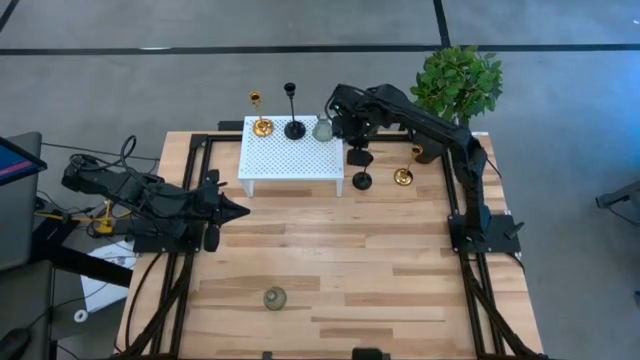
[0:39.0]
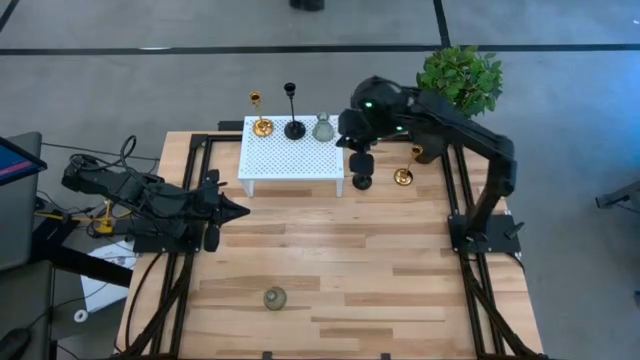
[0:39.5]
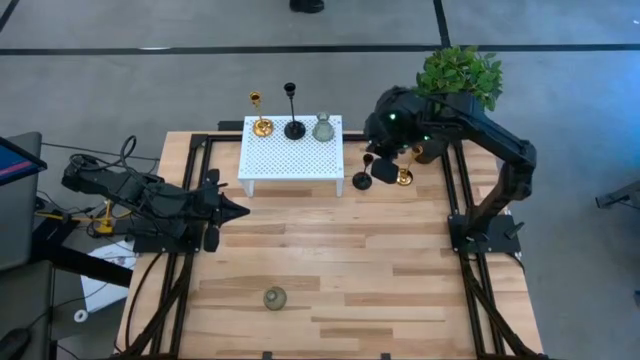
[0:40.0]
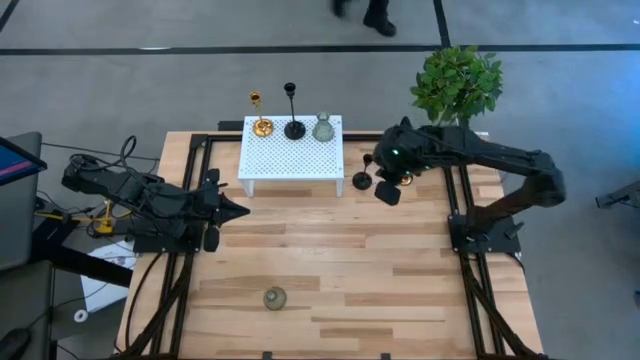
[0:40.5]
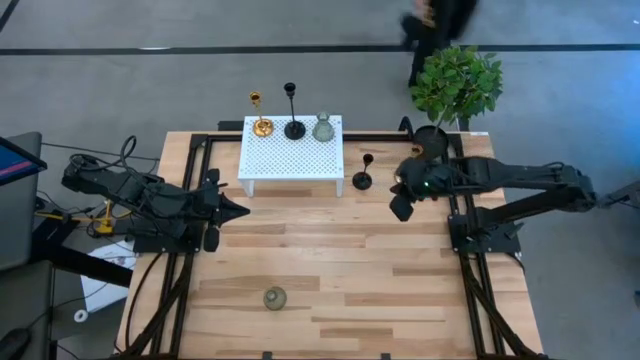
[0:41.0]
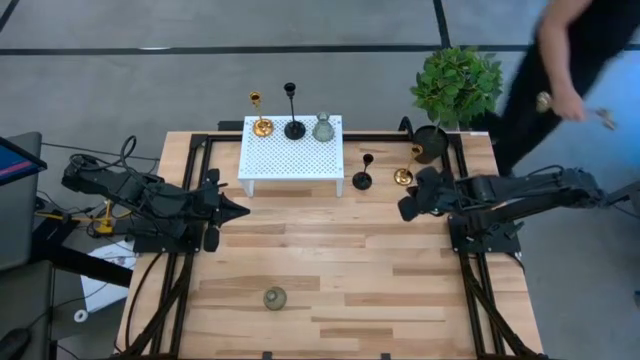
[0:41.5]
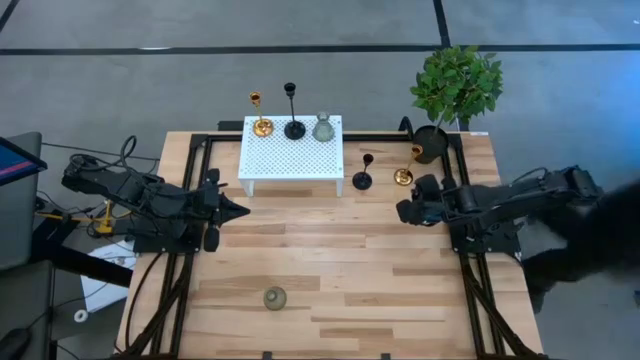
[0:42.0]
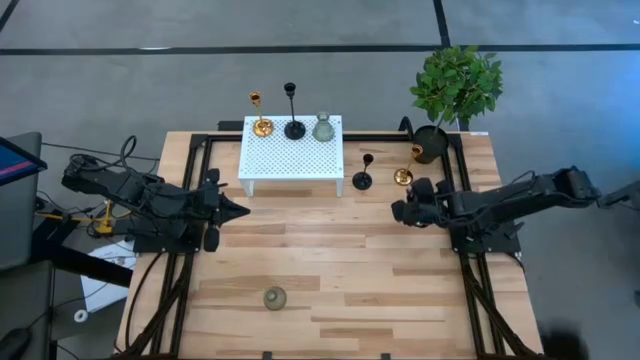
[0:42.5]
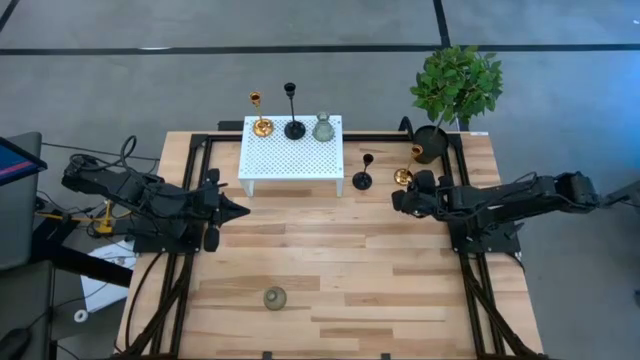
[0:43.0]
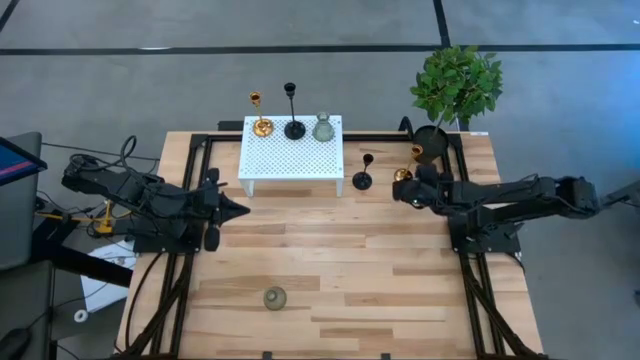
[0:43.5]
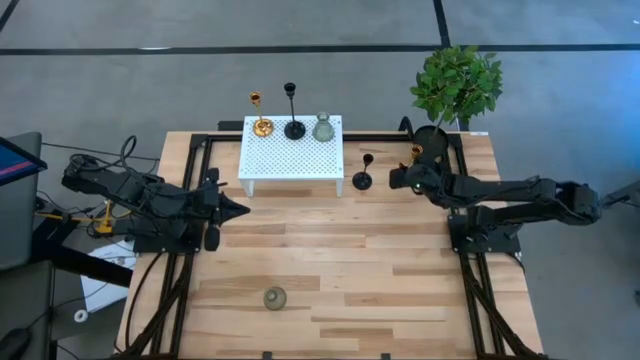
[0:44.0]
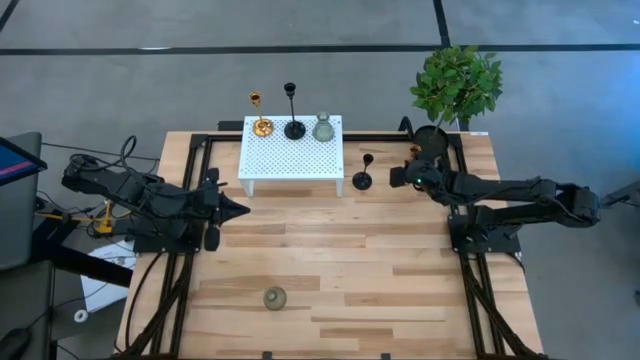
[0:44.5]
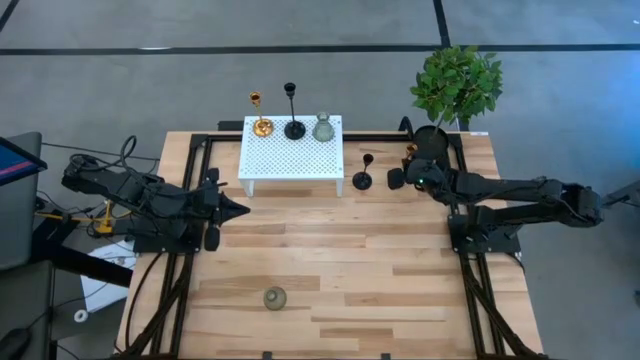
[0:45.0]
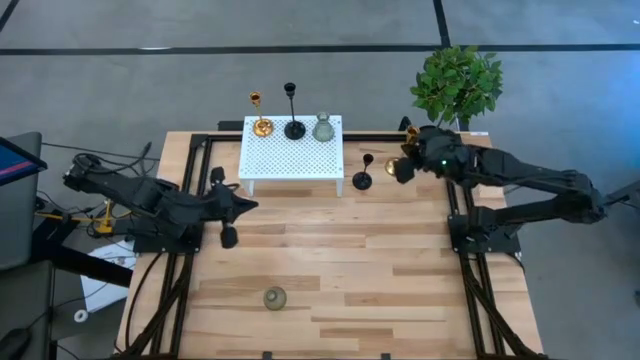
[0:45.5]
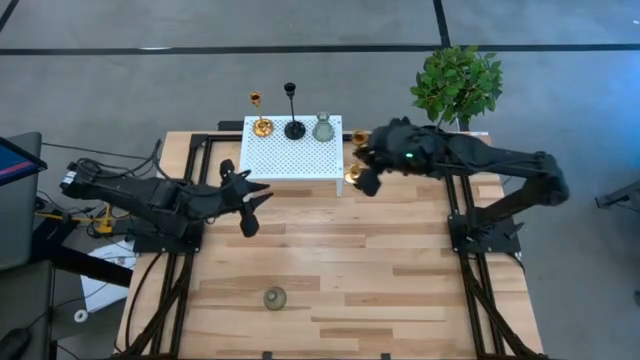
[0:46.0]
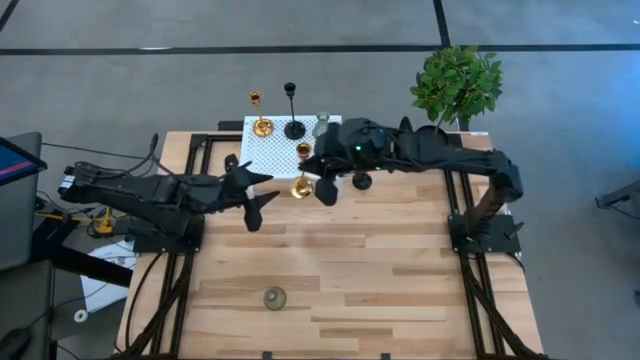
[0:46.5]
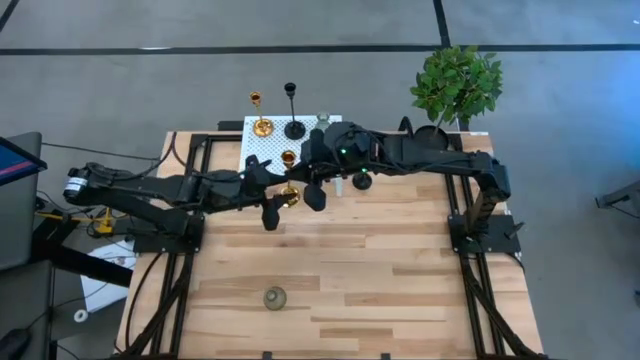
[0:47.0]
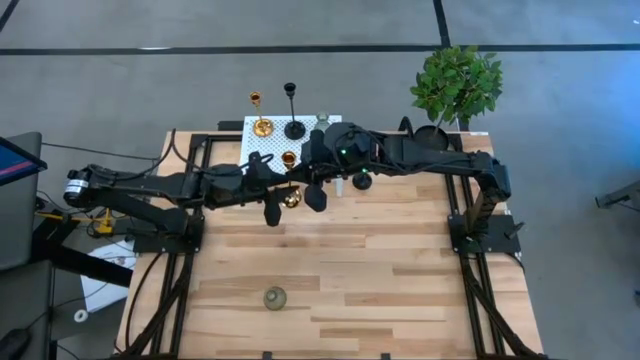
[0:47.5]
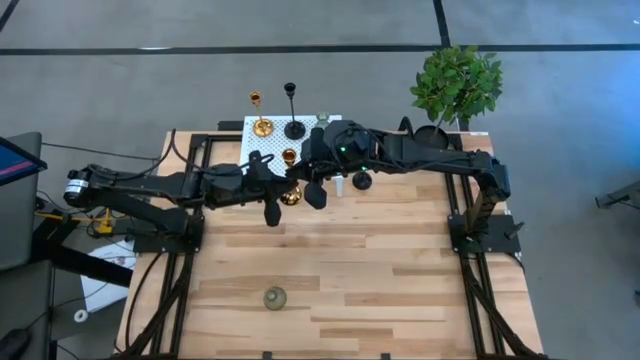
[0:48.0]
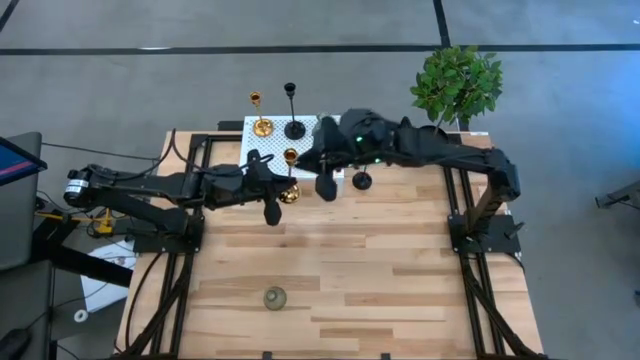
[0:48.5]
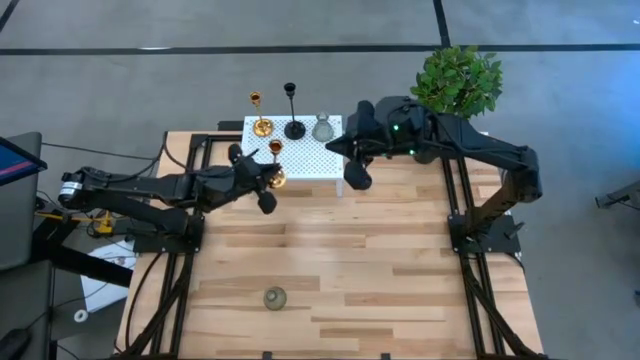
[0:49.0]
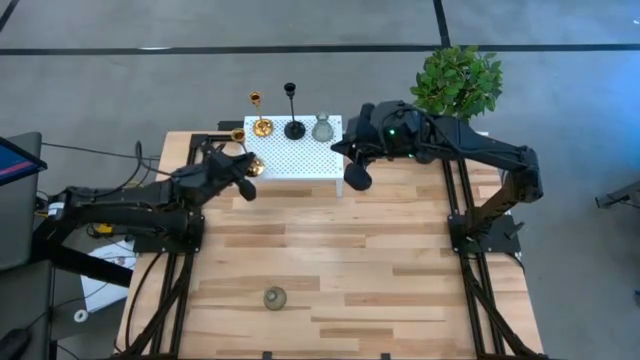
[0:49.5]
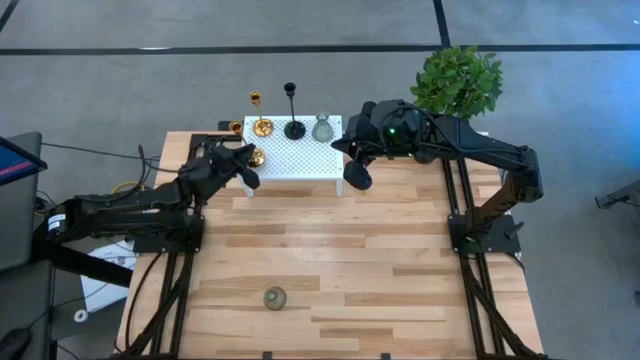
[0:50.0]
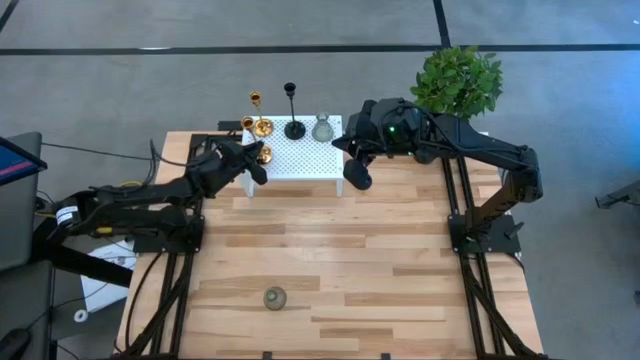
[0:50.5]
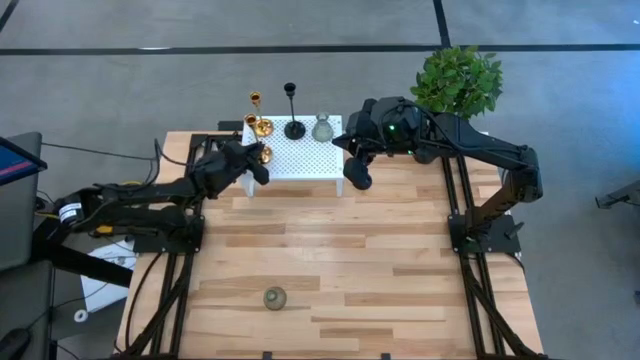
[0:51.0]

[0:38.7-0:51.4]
Task: Pick & Place candle stick holders
Put the golden candle holder on the shelf aligned with the other golden candle holder

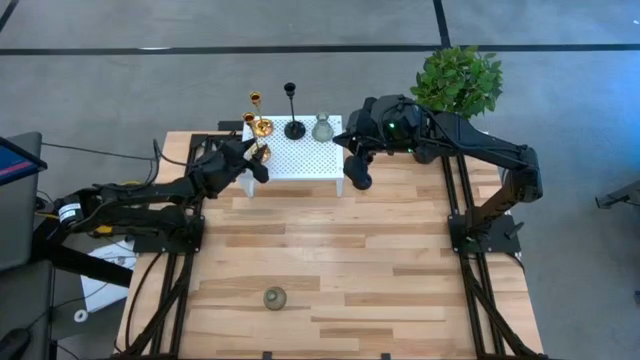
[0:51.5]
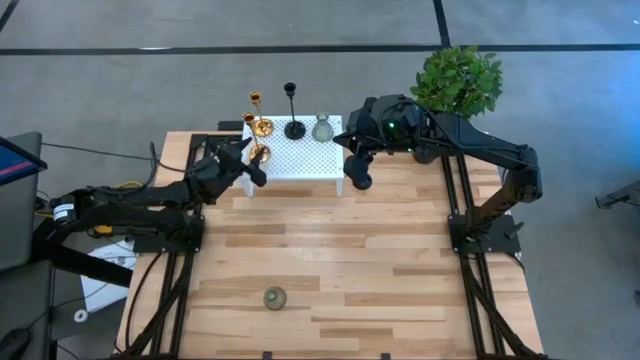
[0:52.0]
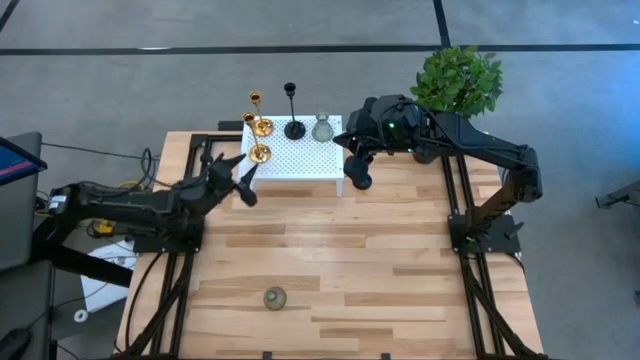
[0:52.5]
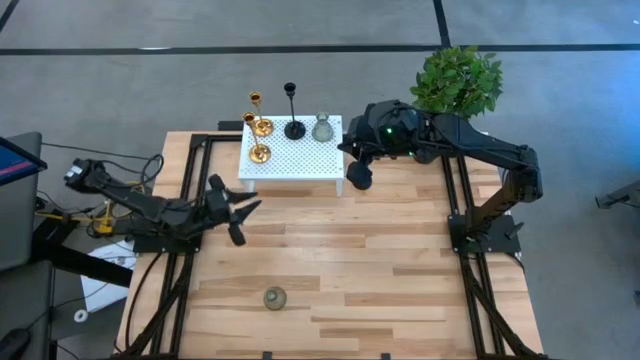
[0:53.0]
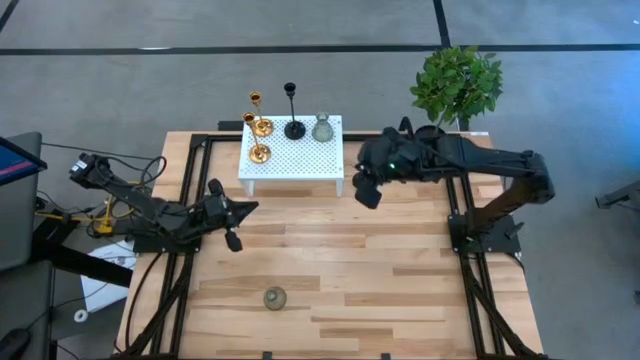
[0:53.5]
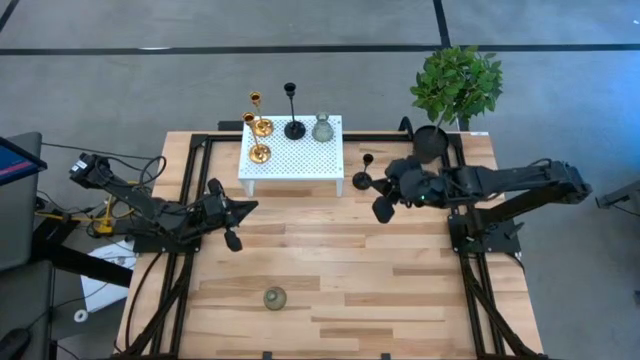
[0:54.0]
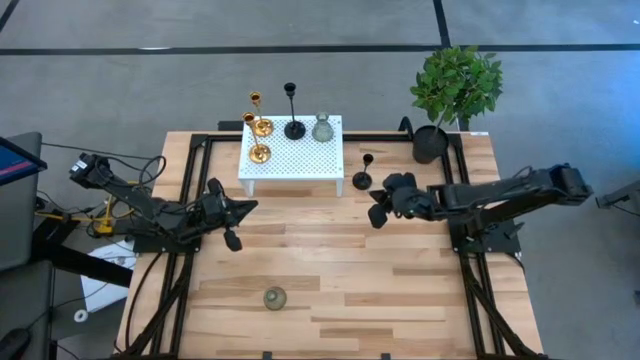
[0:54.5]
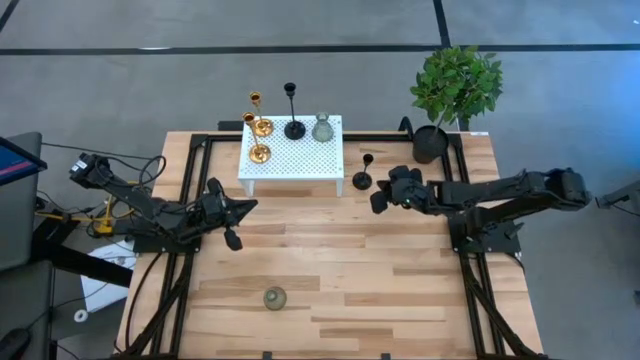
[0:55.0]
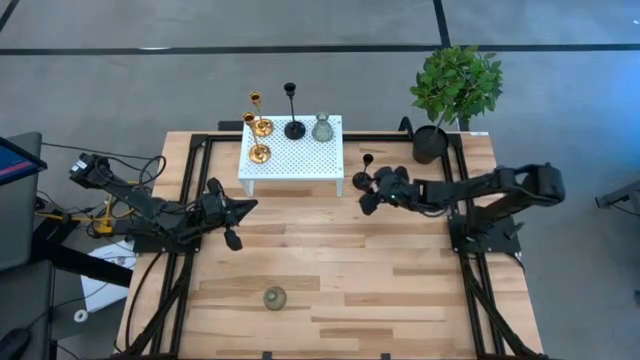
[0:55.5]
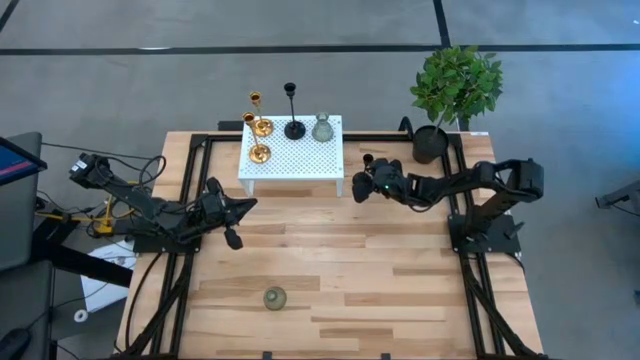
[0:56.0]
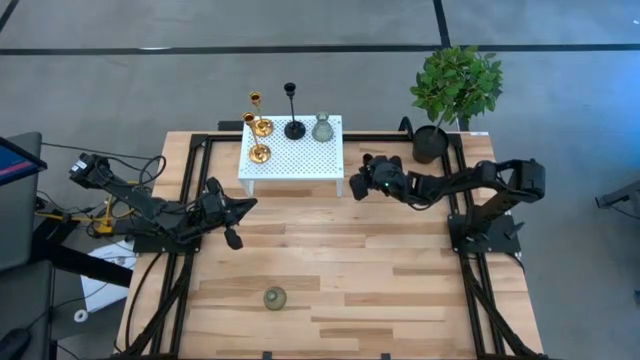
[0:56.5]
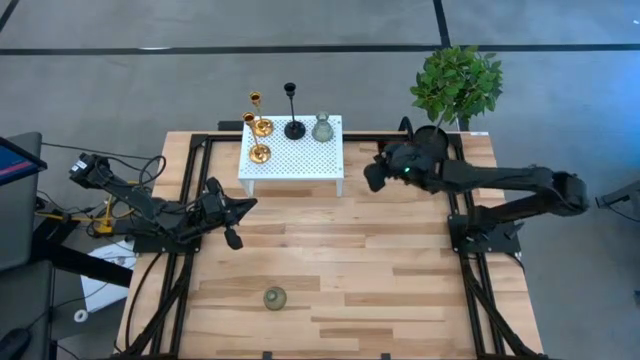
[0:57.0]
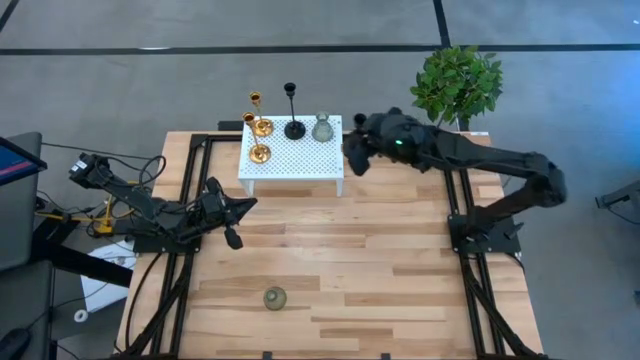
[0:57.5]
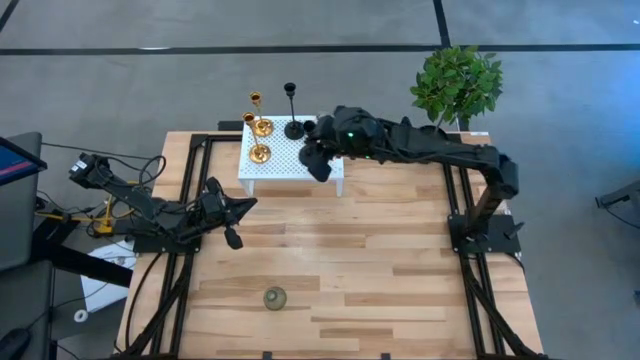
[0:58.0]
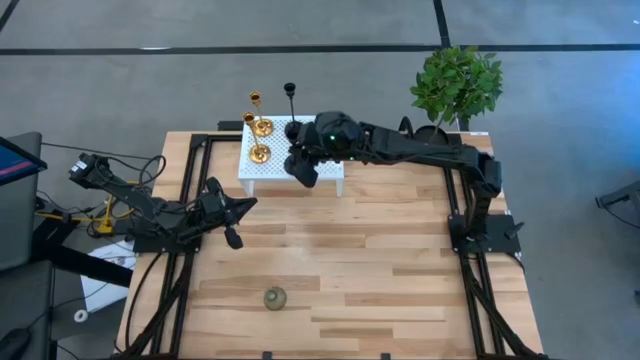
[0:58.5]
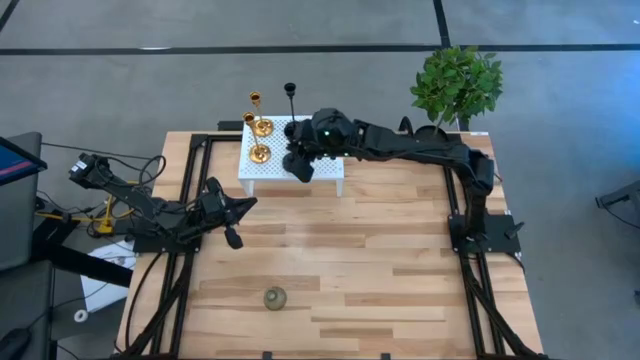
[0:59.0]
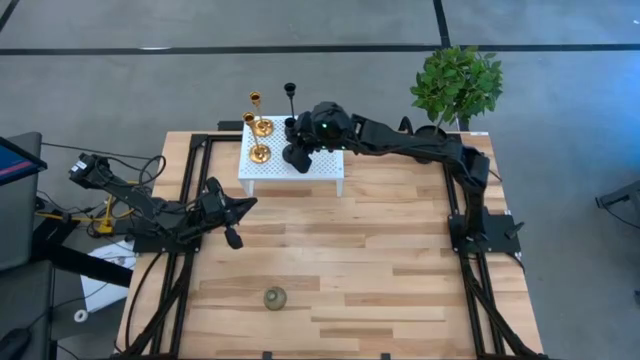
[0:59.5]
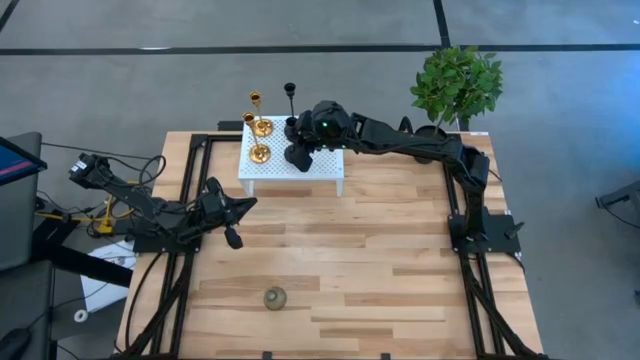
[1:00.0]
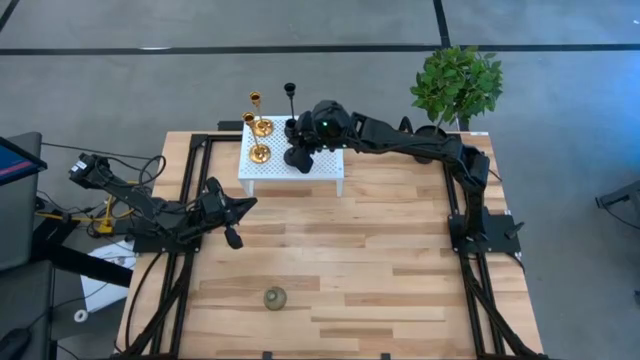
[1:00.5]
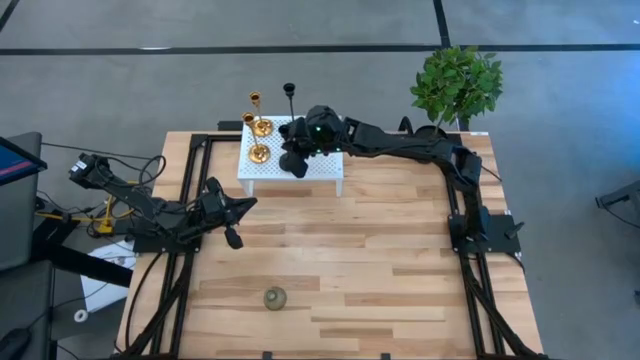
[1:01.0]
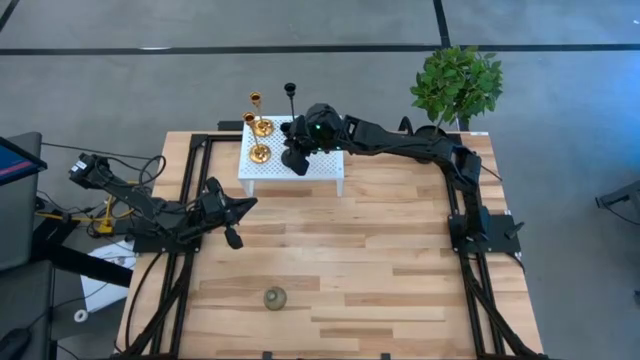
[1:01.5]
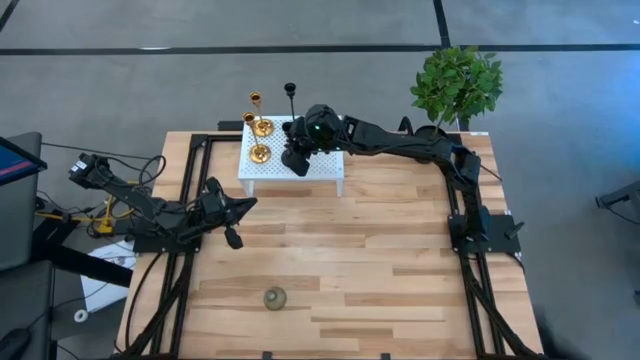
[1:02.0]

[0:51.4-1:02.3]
Put the black candle holder on the shelf aligned with the other black candle holder
